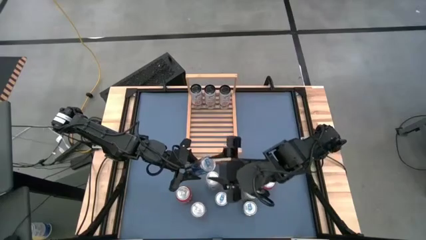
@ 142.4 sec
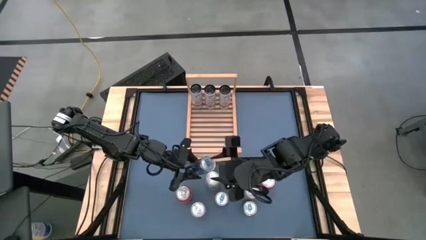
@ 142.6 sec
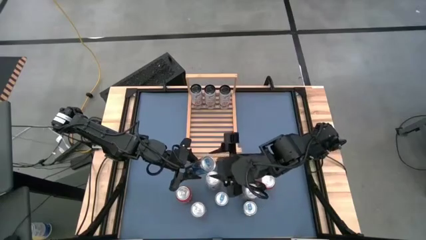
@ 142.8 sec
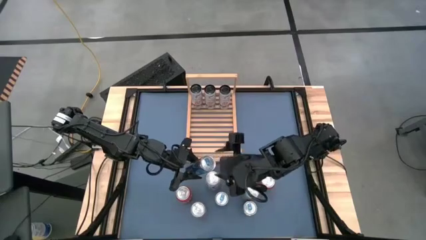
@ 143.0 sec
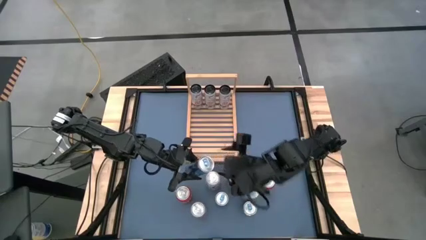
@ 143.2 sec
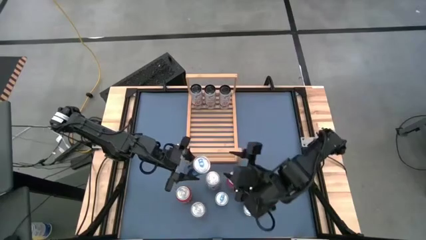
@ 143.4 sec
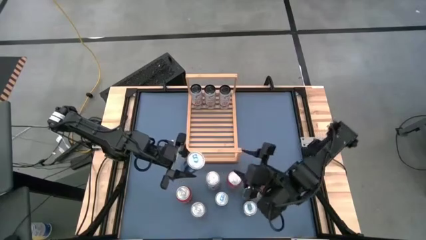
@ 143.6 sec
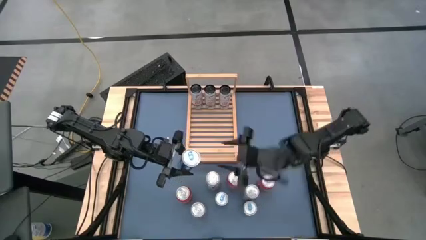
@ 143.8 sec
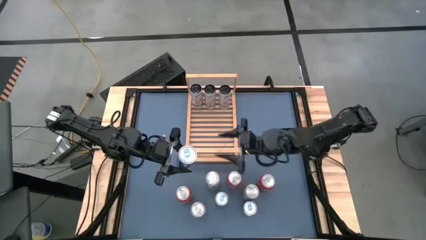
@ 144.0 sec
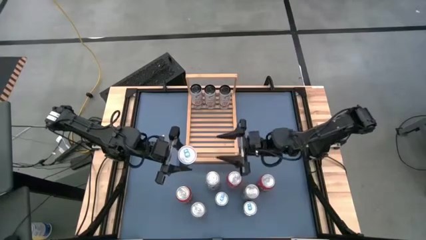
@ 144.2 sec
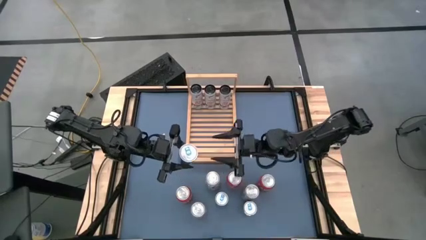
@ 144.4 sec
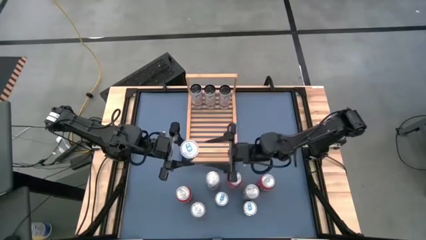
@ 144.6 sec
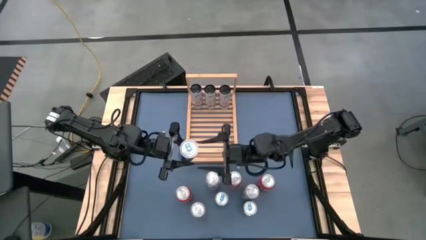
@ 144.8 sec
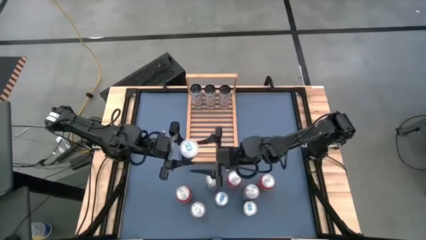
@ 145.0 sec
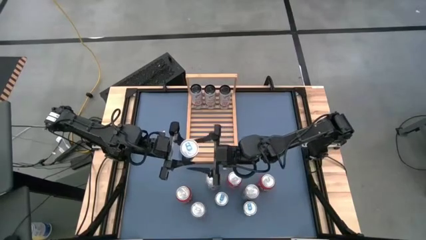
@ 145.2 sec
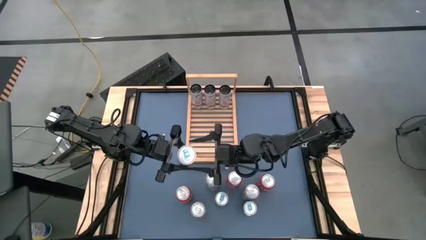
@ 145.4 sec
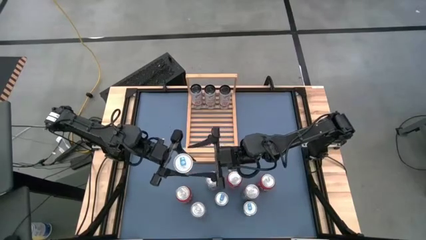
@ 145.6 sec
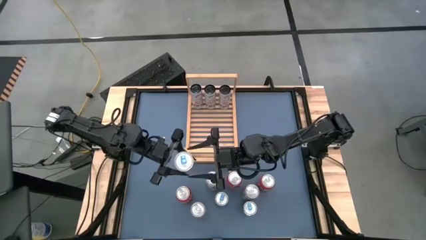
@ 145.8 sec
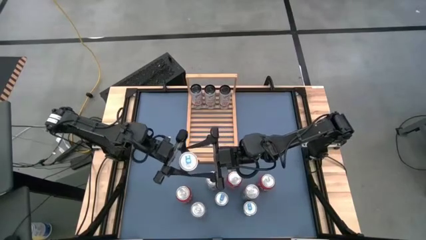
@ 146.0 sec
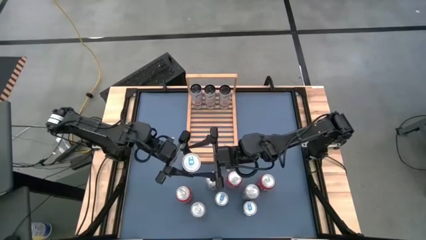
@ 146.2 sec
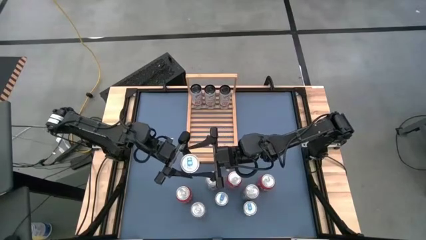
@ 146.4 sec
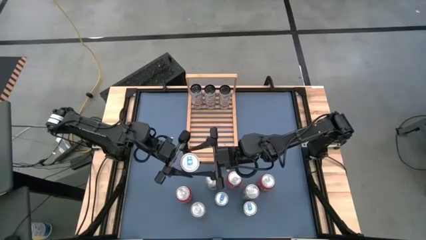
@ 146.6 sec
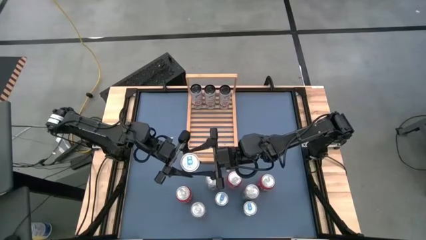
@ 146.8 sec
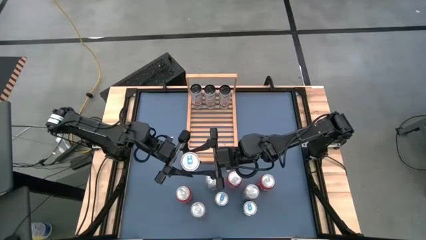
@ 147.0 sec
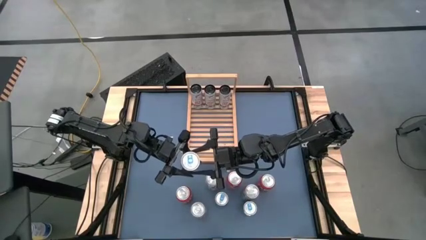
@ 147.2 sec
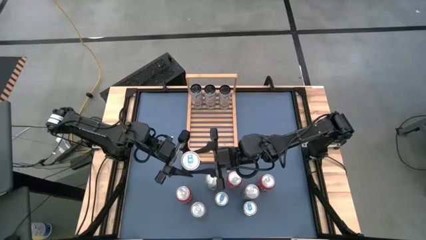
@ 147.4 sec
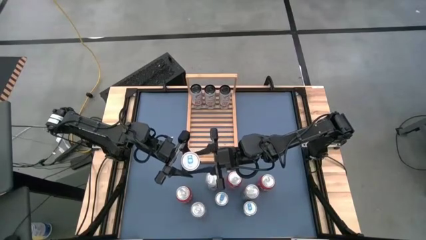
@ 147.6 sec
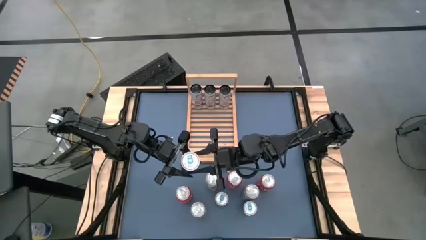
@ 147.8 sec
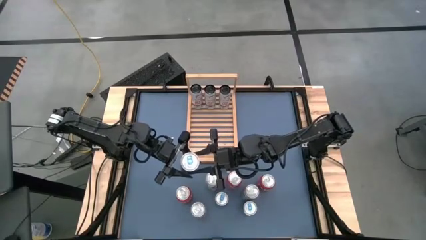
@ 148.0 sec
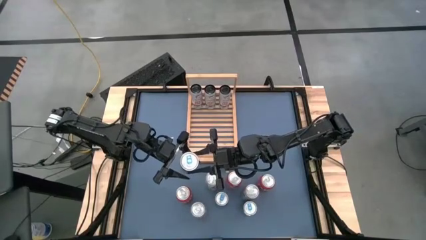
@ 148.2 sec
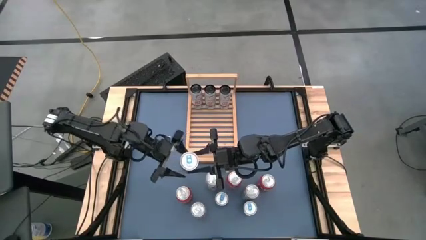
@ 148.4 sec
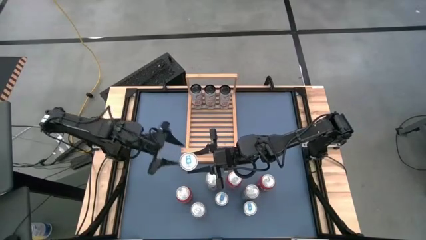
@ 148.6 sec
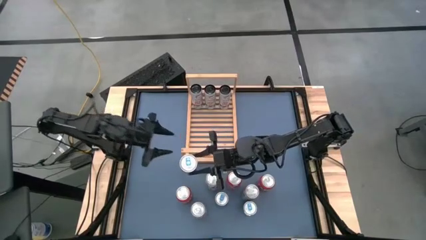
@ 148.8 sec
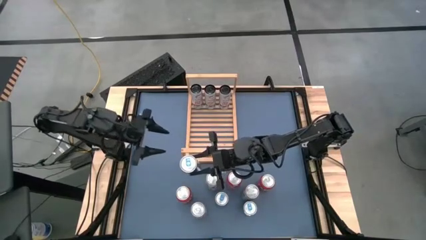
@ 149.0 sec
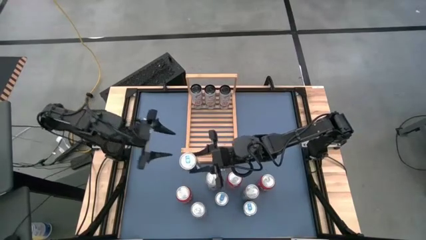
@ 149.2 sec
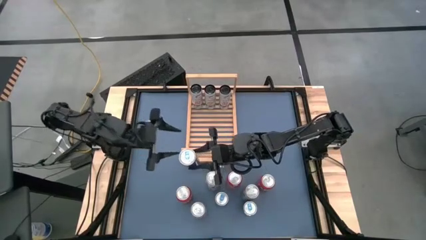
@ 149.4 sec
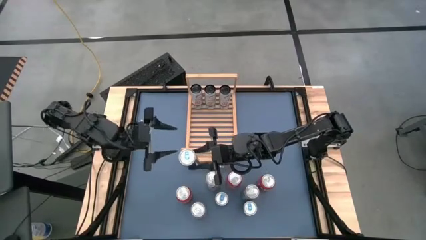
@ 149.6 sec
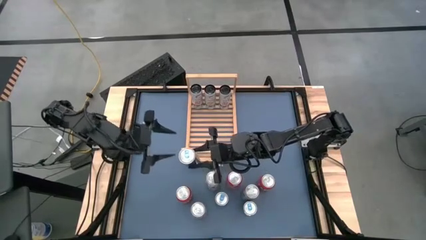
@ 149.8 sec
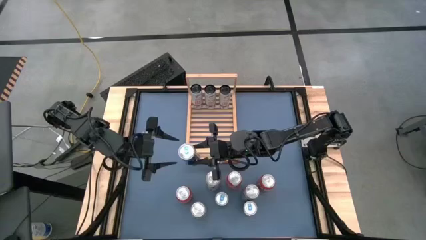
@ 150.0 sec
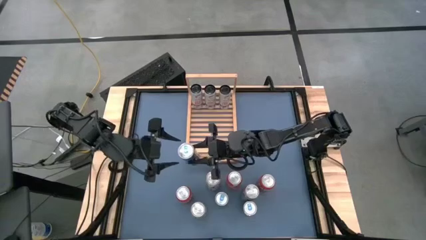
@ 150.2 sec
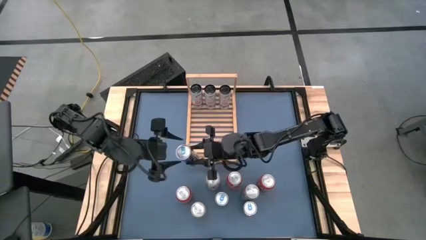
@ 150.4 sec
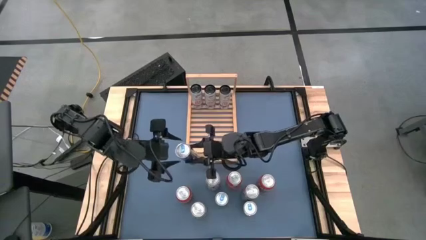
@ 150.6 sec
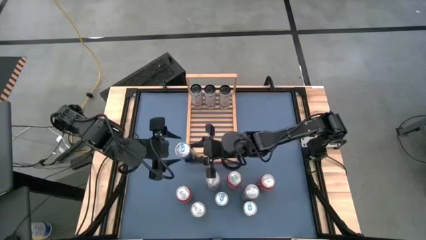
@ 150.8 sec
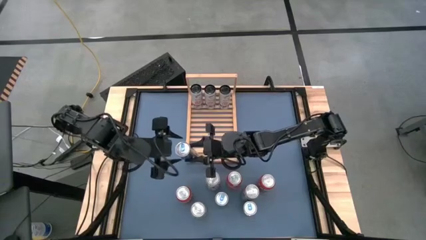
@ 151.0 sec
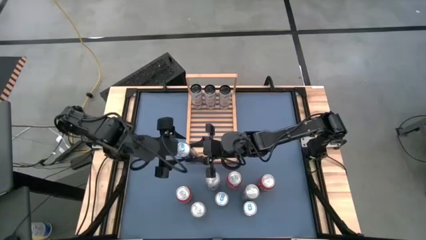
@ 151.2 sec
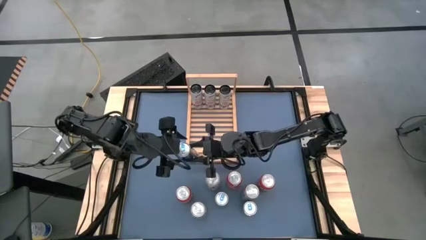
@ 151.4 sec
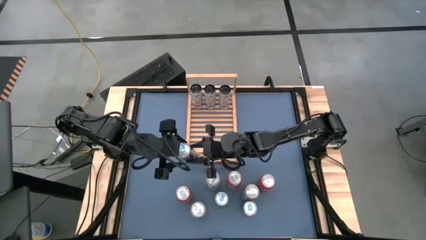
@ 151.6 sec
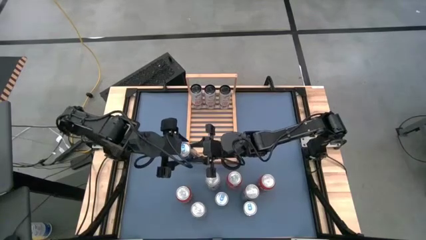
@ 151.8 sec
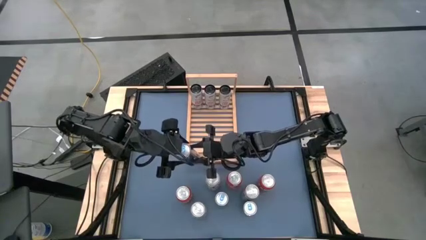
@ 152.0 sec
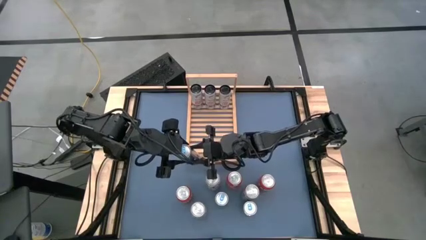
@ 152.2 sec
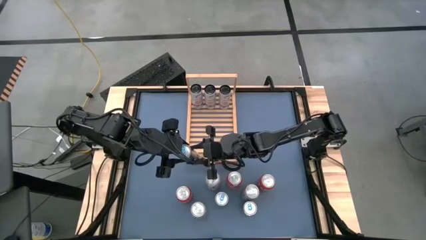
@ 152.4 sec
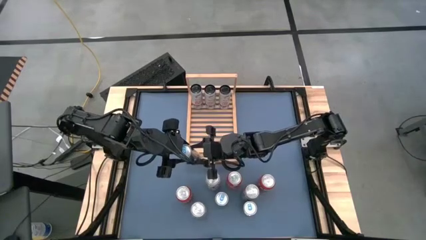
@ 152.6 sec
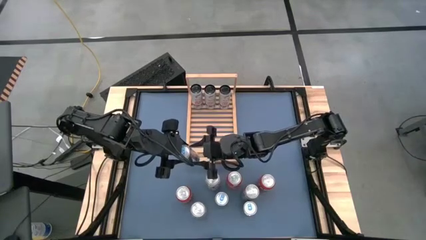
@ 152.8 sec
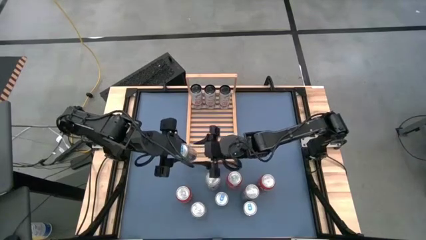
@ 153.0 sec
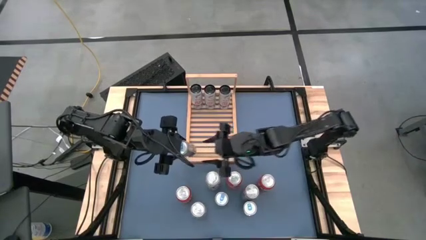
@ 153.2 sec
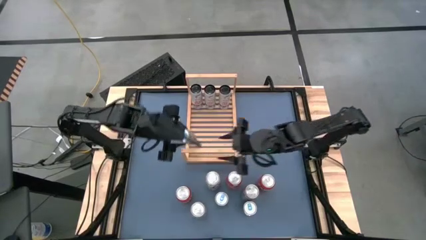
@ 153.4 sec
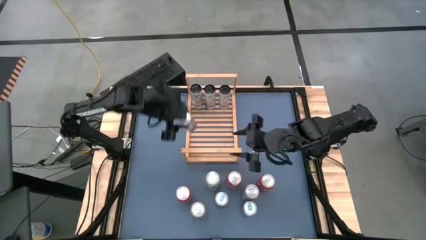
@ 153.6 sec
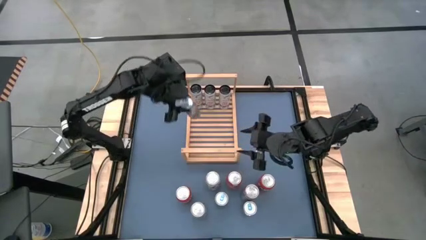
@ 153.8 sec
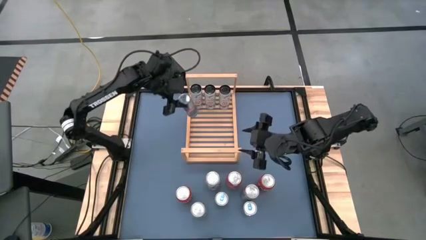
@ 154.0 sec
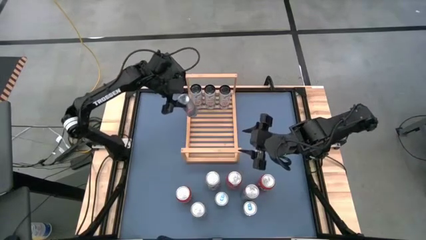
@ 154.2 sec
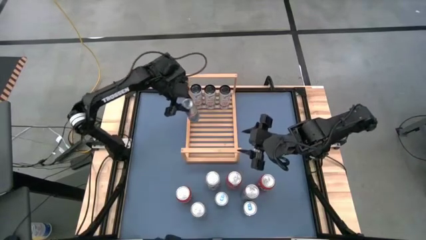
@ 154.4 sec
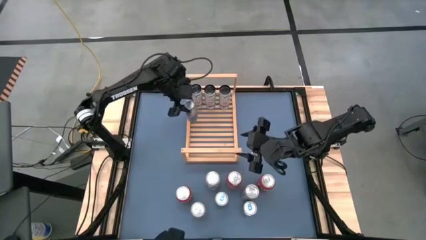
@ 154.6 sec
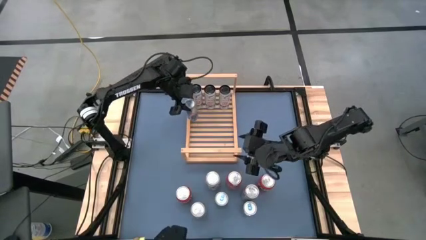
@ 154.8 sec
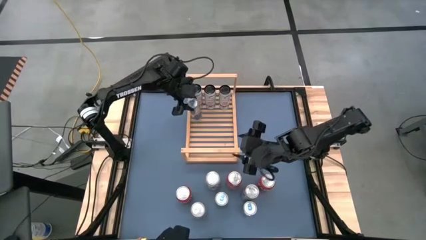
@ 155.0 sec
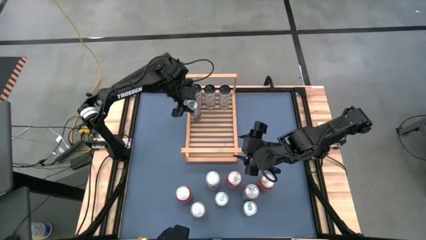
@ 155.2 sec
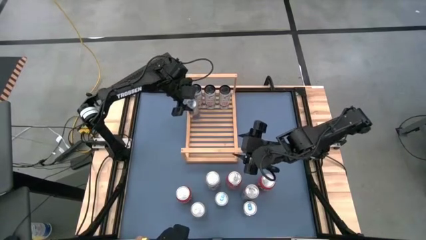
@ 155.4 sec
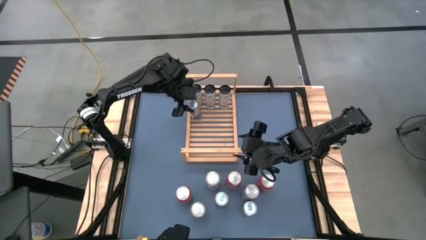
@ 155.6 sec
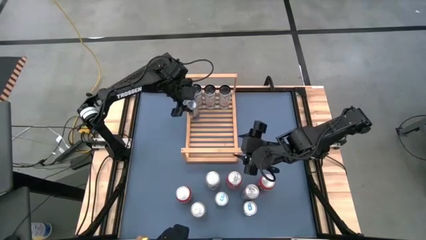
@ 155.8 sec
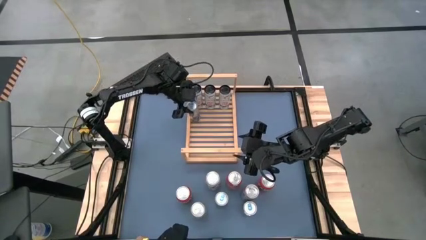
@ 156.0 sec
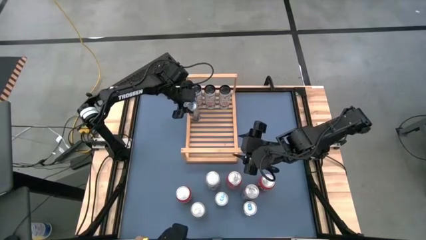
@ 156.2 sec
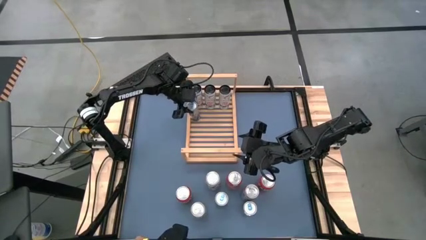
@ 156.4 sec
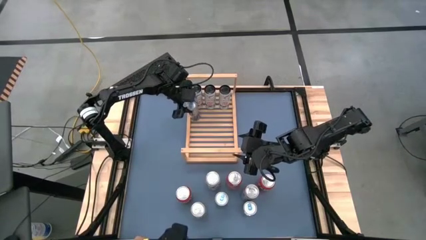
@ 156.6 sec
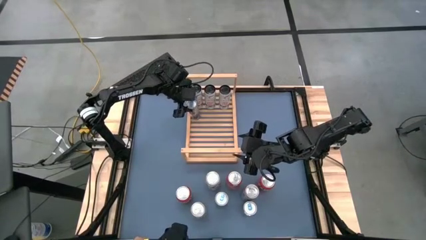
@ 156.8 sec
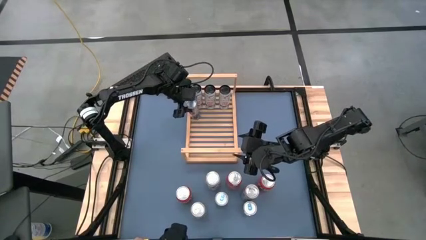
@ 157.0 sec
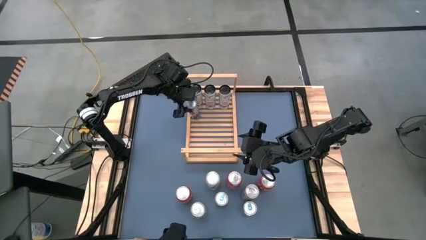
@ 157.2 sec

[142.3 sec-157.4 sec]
Task: Place canned beverage on shelf
Put the top blue soda can on the shelf
